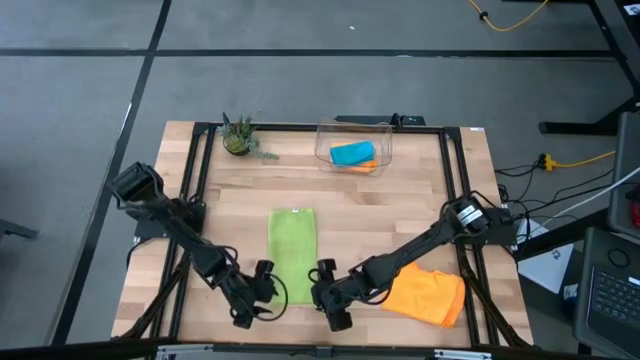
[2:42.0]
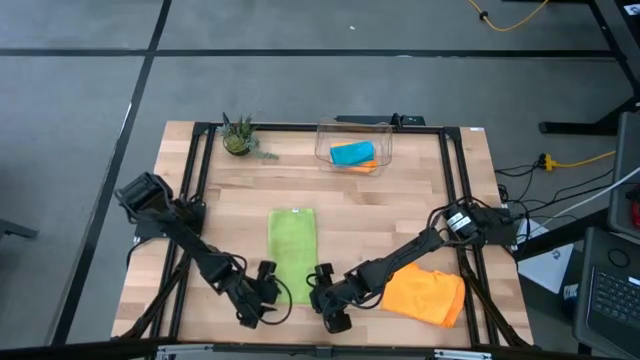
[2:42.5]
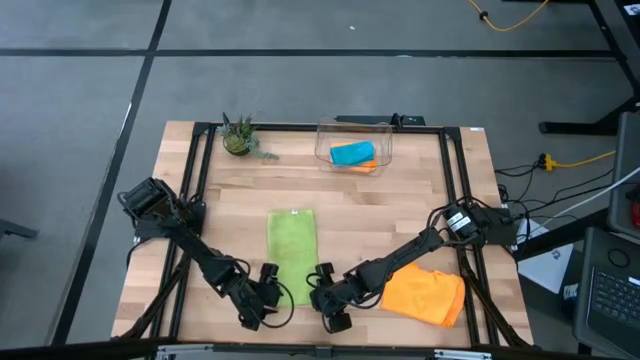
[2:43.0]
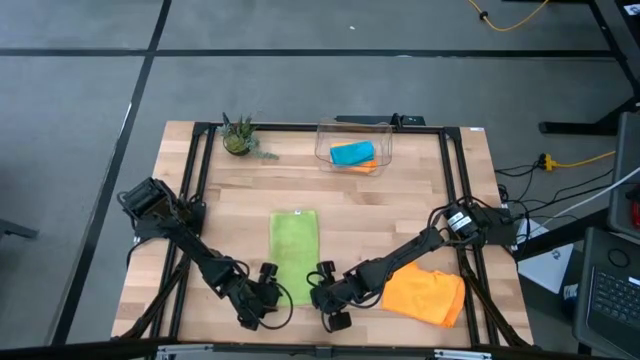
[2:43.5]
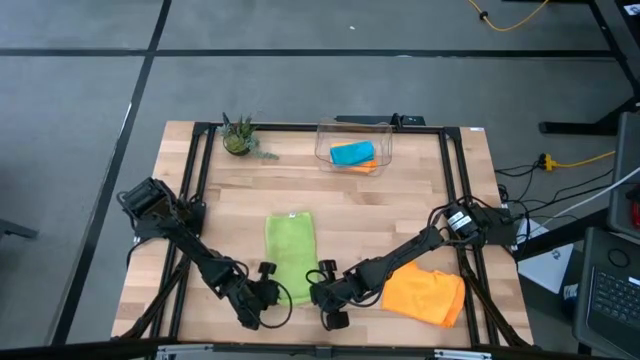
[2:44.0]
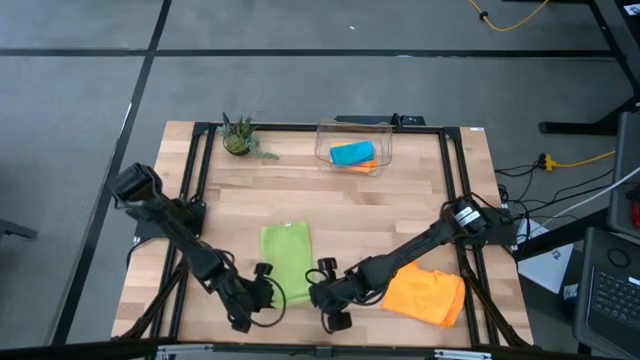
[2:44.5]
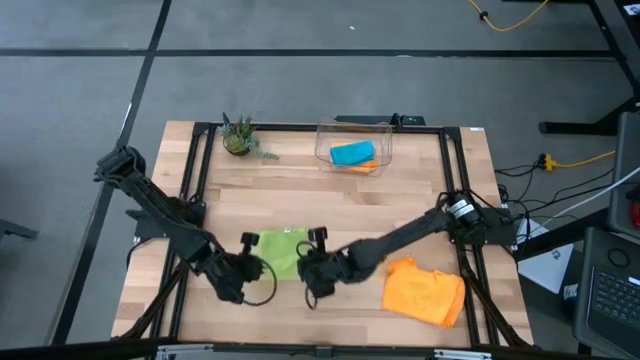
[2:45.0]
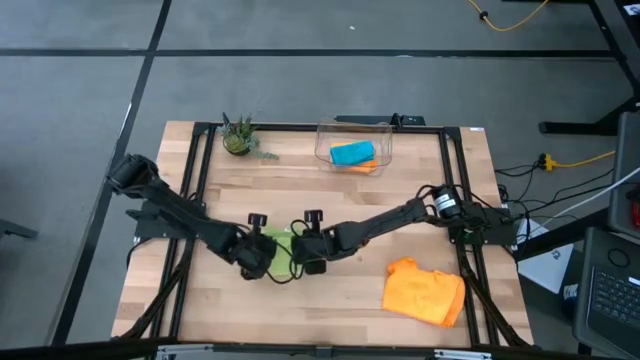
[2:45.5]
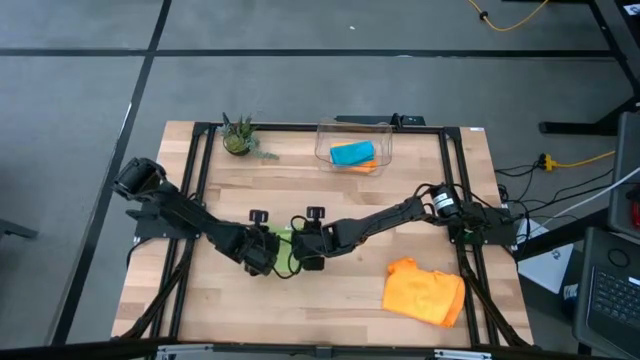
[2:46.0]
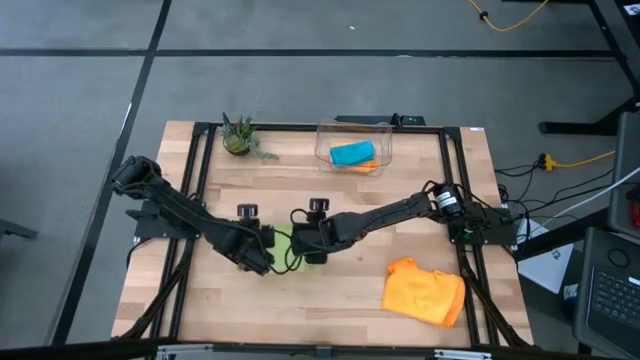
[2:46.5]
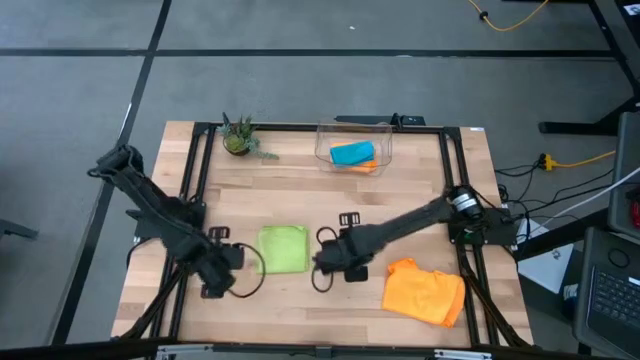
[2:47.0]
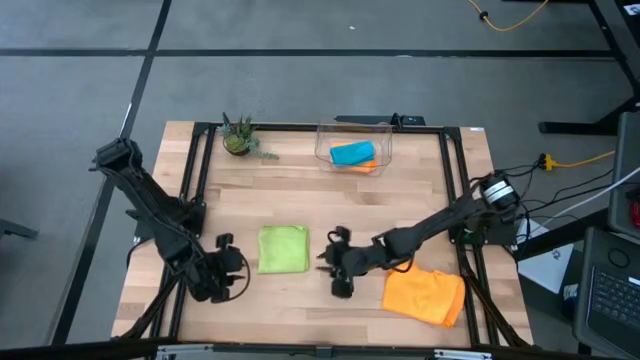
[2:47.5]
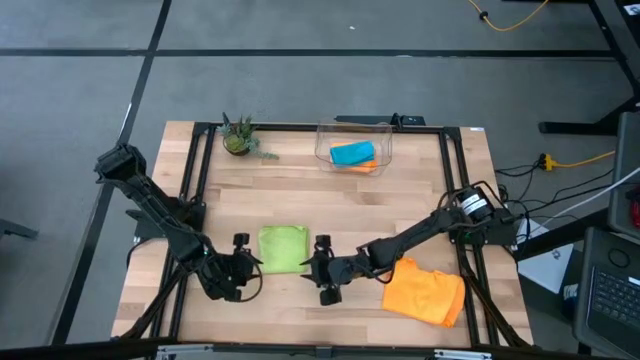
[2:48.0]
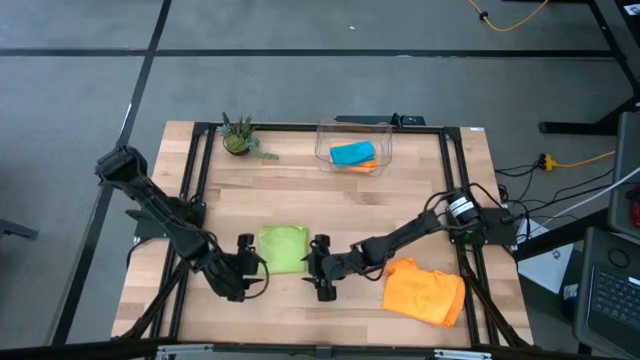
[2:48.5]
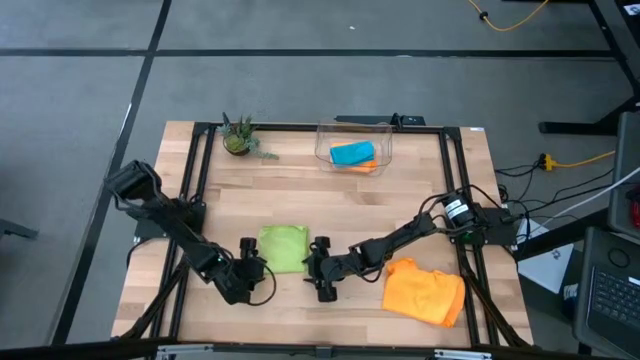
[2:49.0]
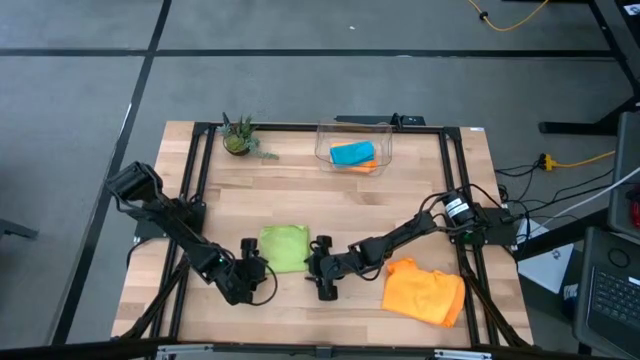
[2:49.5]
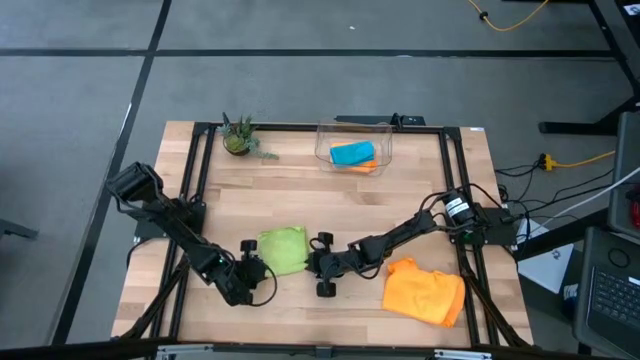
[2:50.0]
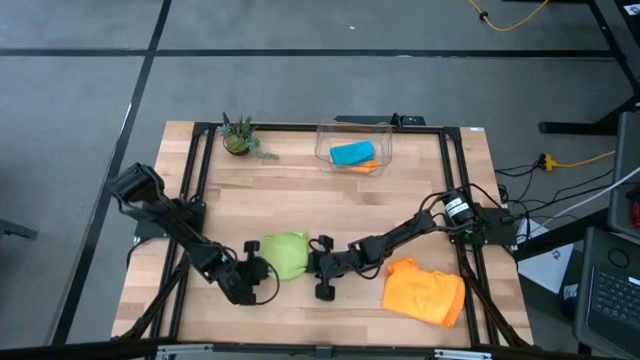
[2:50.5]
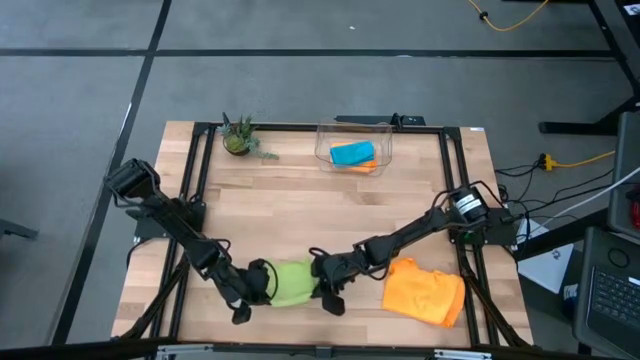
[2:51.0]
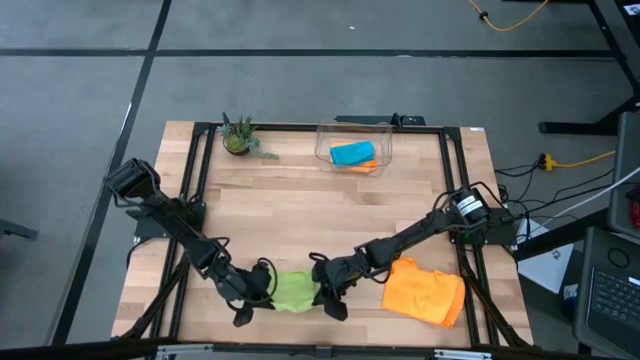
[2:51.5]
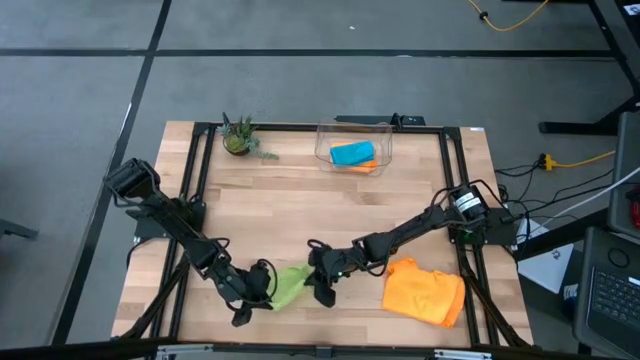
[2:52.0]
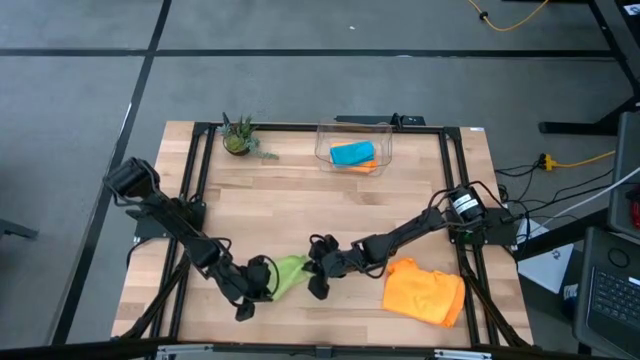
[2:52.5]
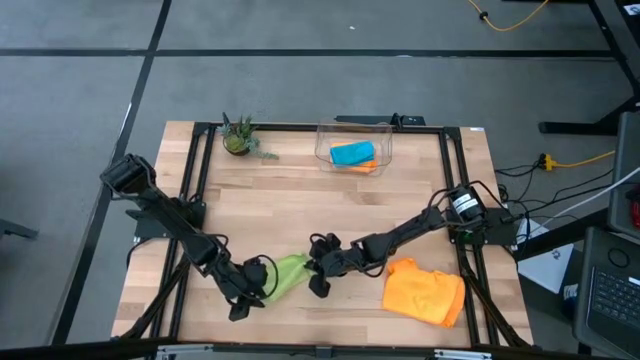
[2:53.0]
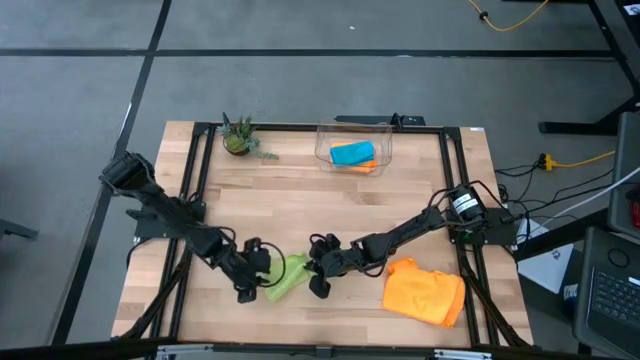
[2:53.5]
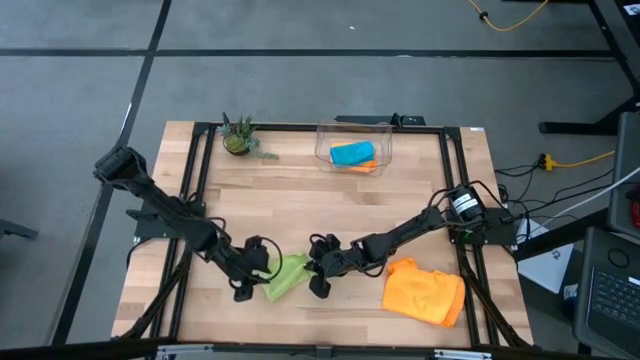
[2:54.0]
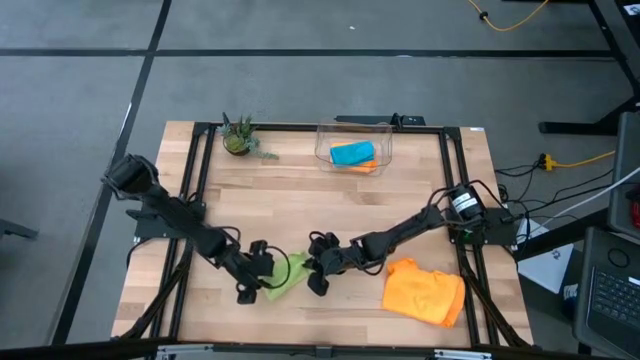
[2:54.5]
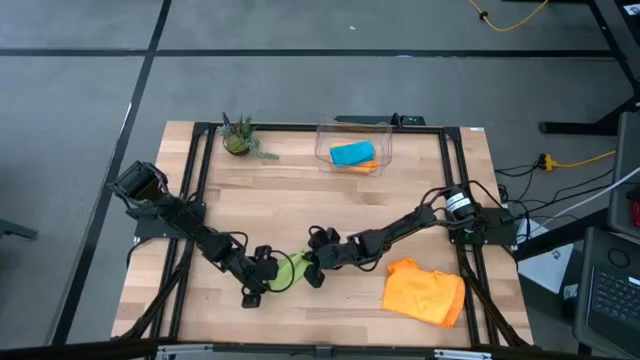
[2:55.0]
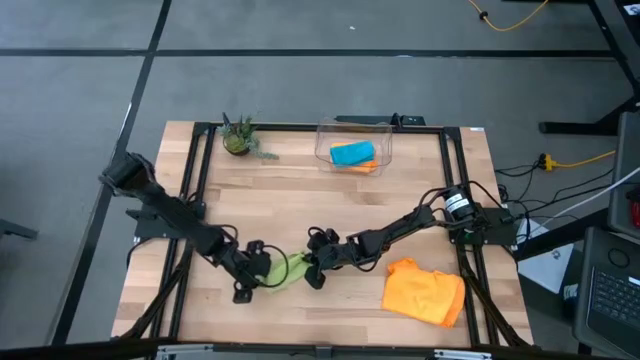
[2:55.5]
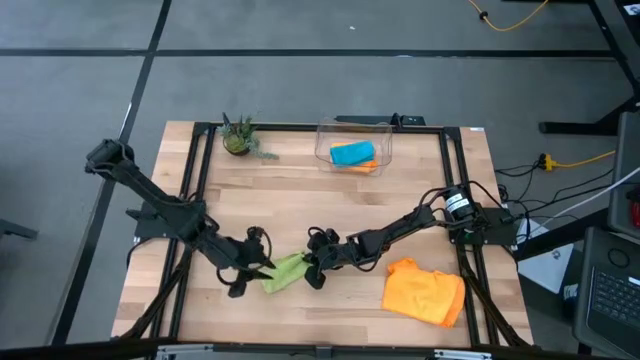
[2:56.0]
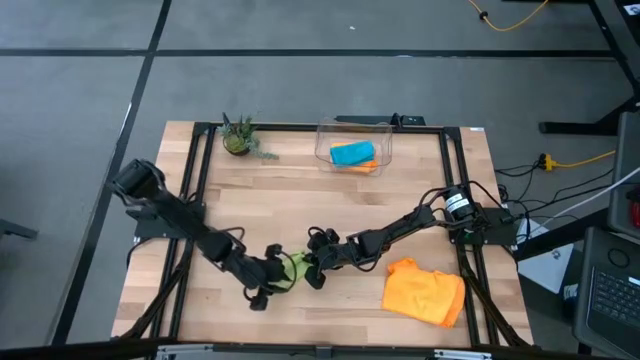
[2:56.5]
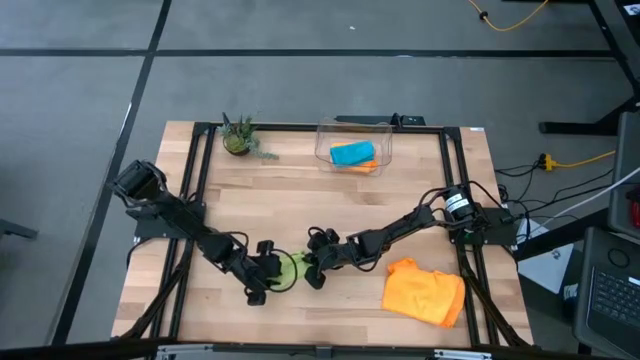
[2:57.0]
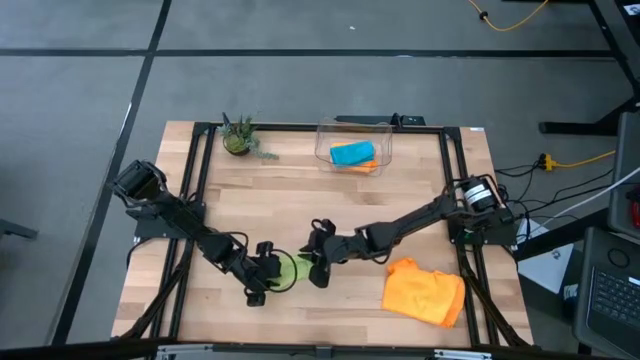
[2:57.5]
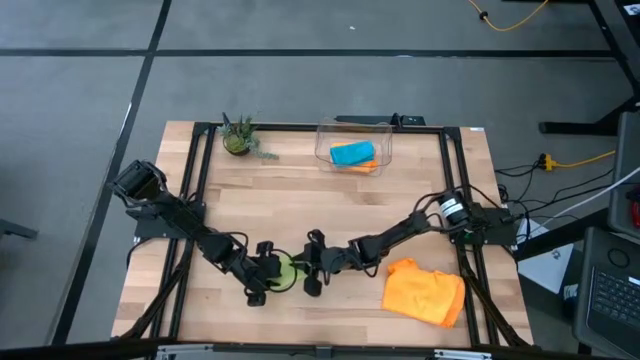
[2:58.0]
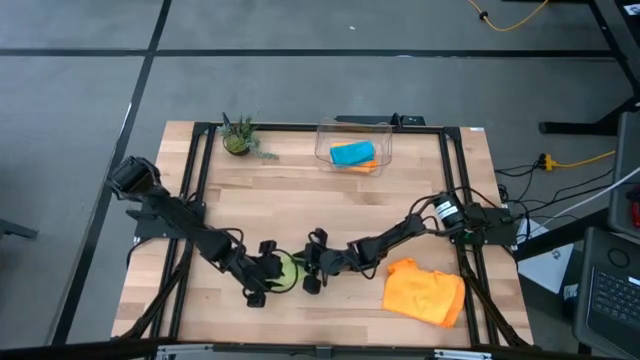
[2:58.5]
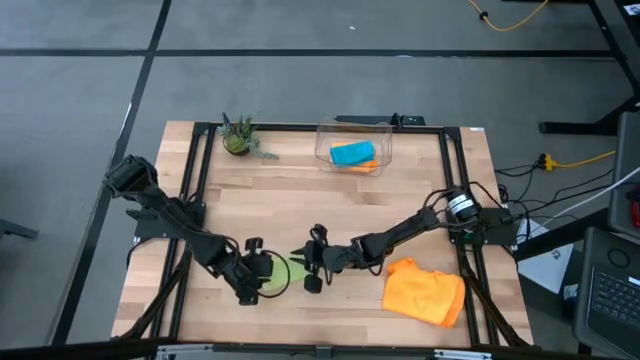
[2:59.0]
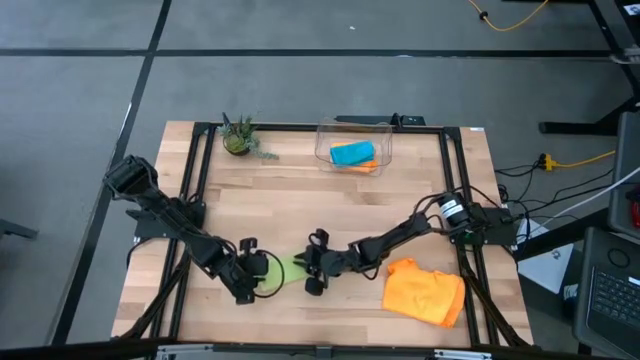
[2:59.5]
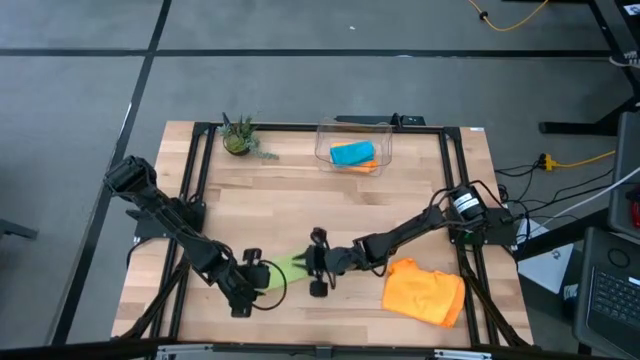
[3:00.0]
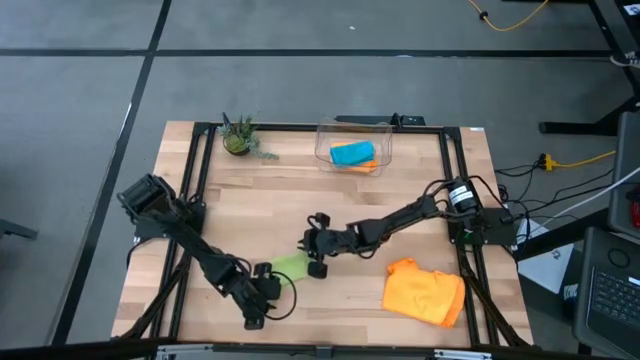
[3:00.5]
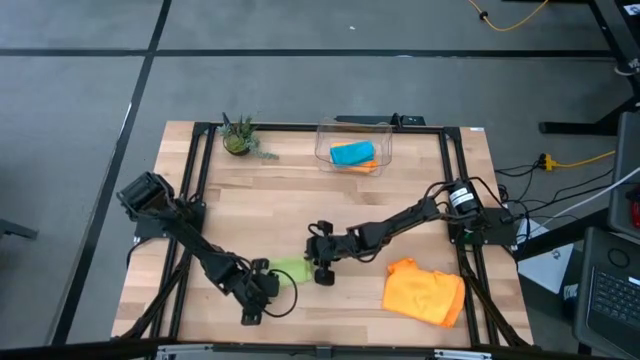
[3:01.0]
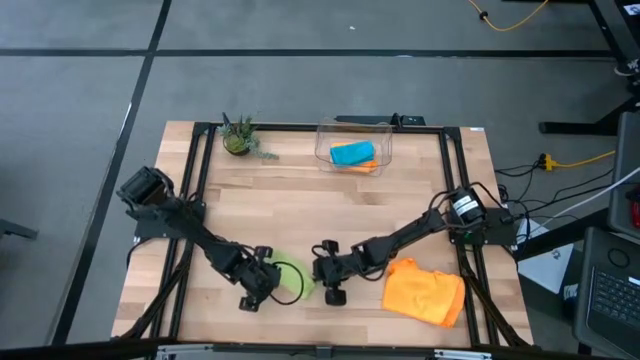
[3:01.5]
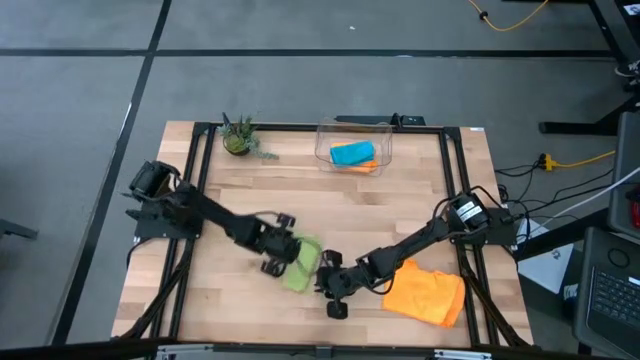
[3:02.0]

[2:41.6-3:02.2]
Task: Fold microfiber towels
Fold the green towel on the table
